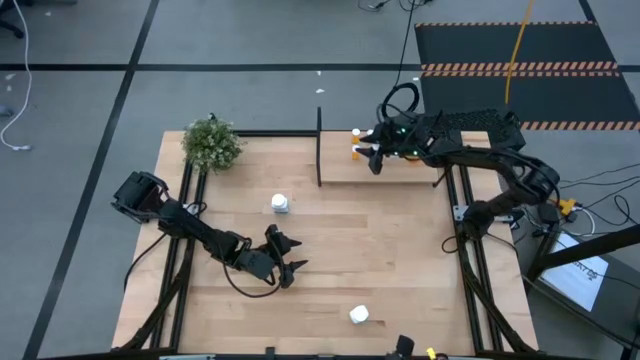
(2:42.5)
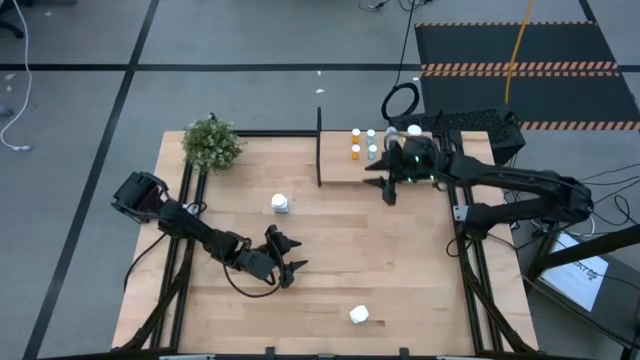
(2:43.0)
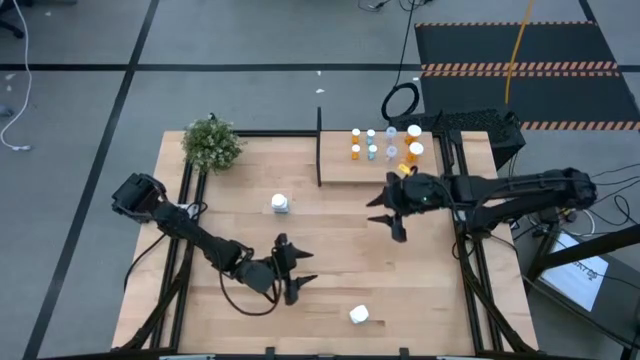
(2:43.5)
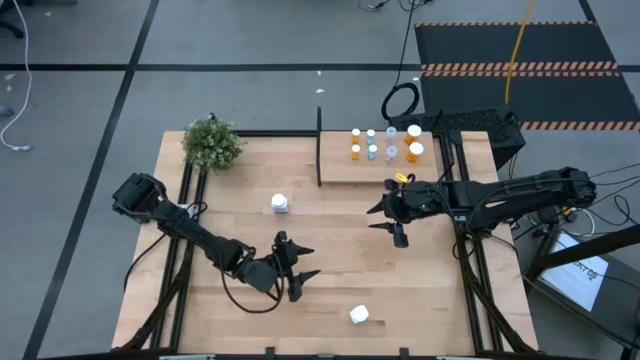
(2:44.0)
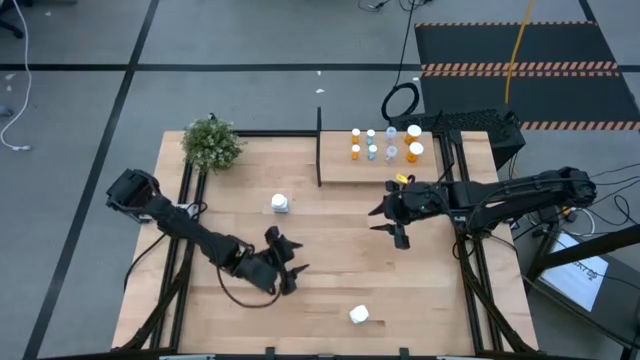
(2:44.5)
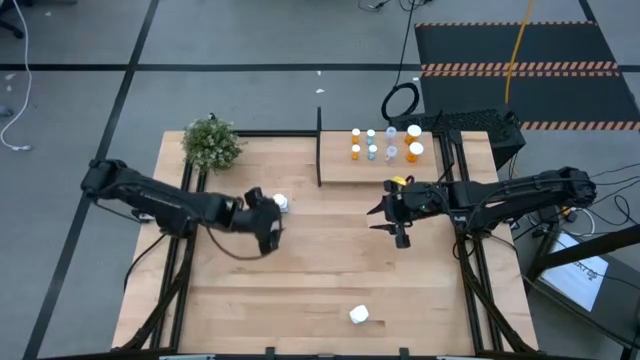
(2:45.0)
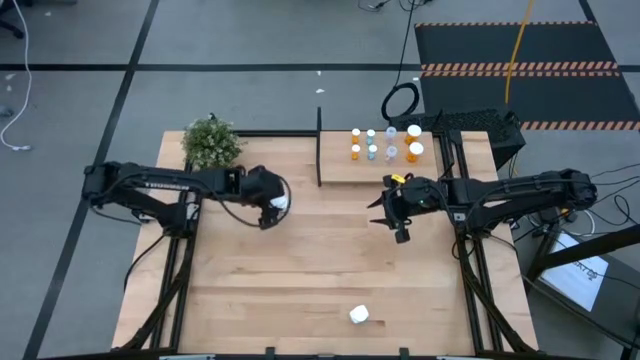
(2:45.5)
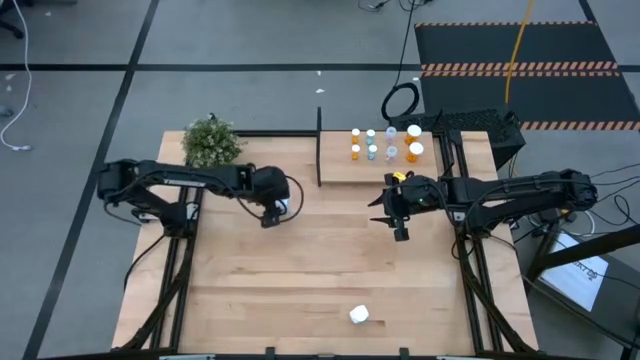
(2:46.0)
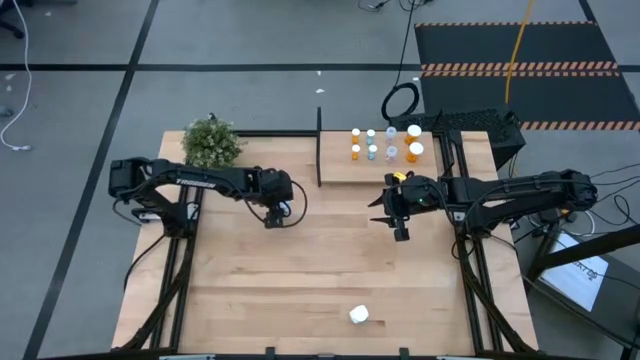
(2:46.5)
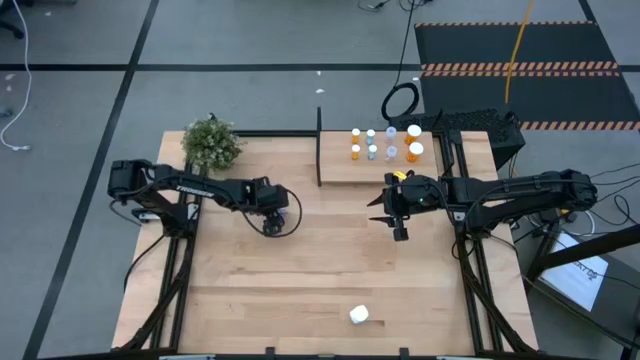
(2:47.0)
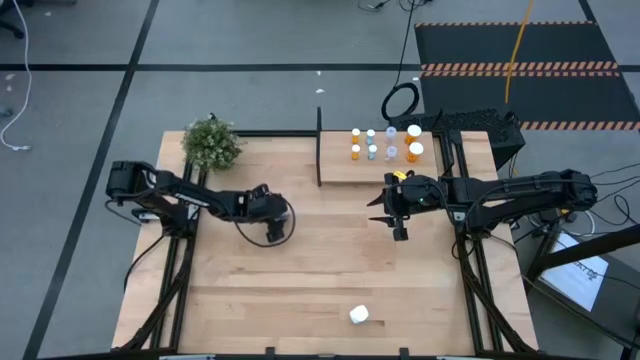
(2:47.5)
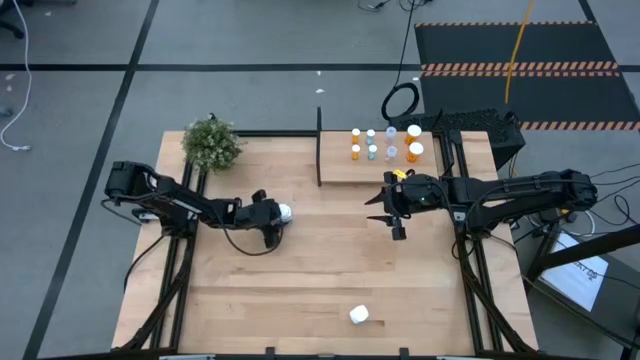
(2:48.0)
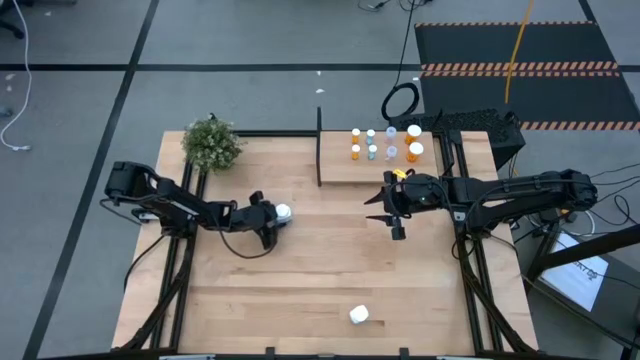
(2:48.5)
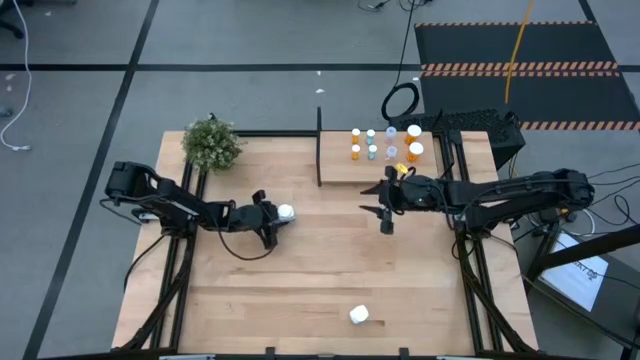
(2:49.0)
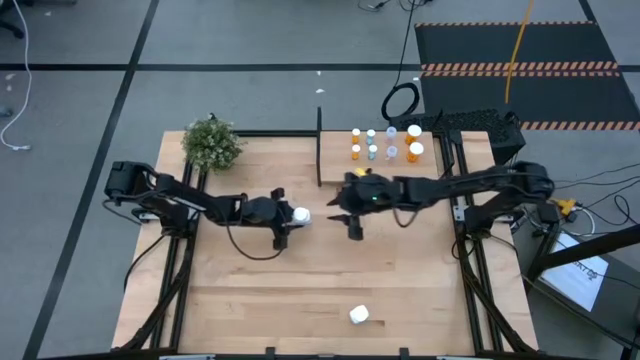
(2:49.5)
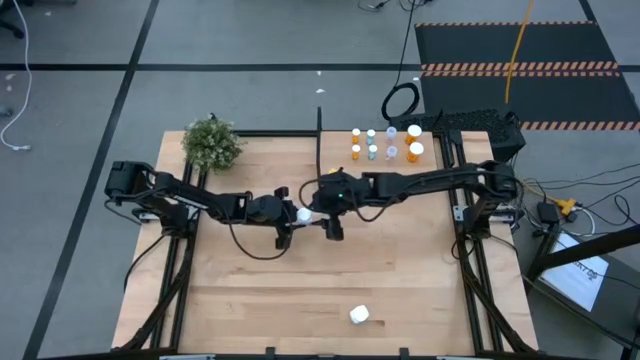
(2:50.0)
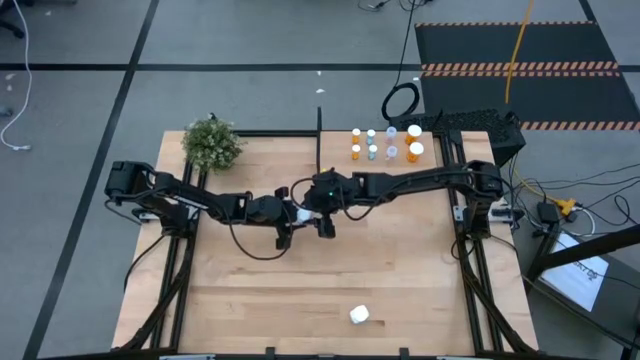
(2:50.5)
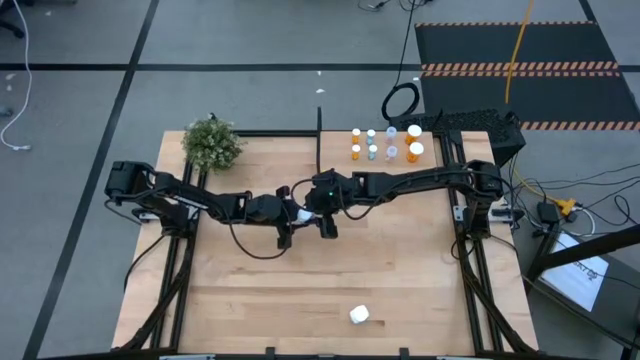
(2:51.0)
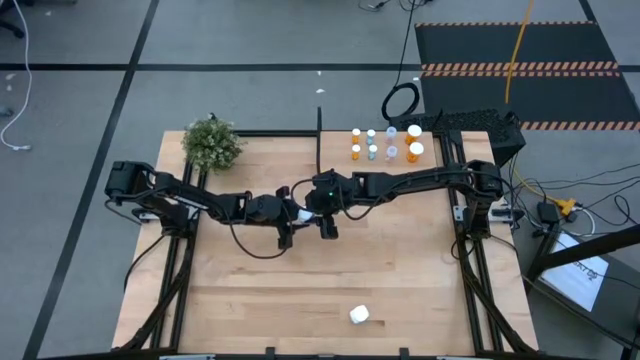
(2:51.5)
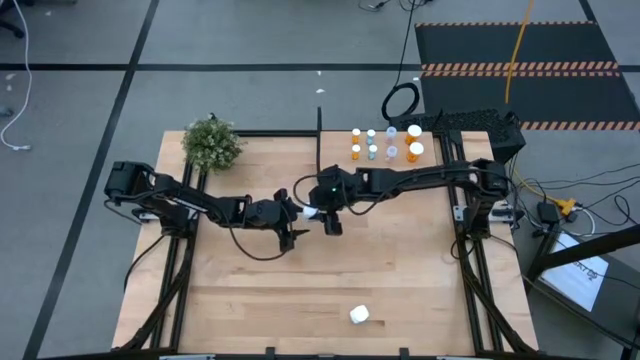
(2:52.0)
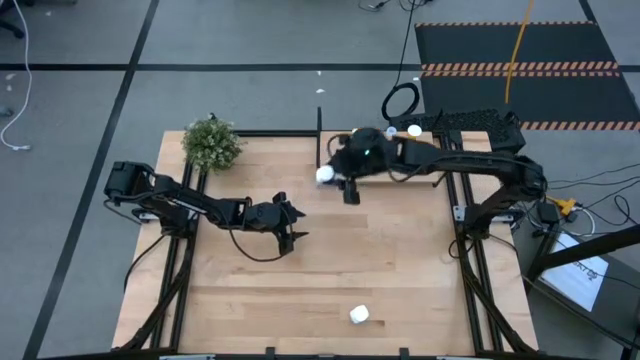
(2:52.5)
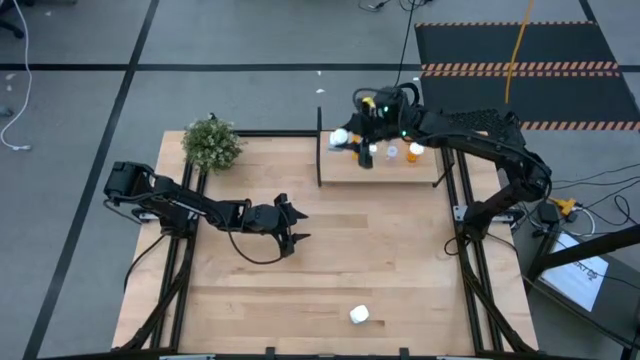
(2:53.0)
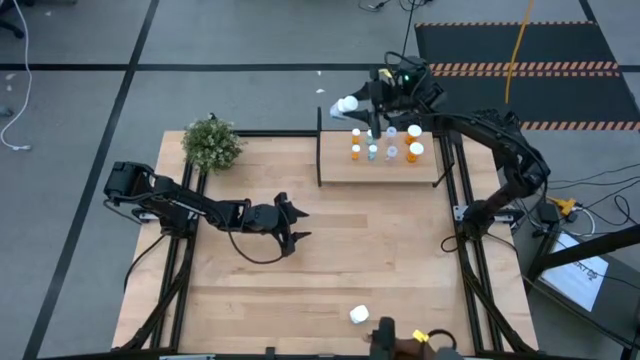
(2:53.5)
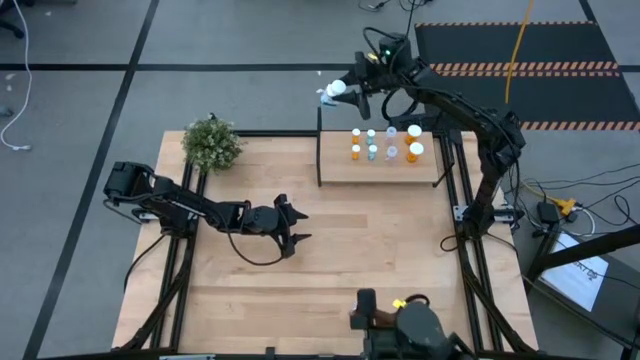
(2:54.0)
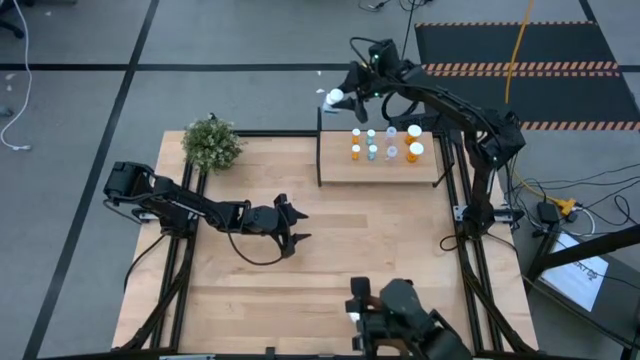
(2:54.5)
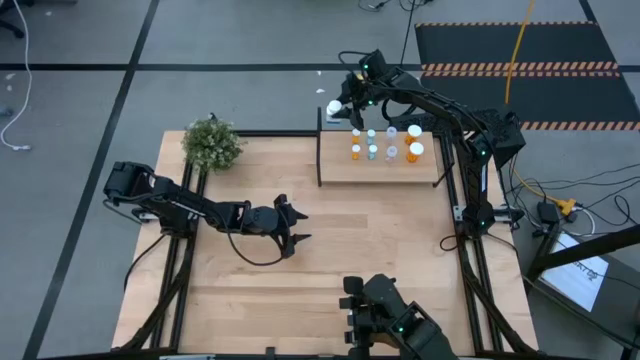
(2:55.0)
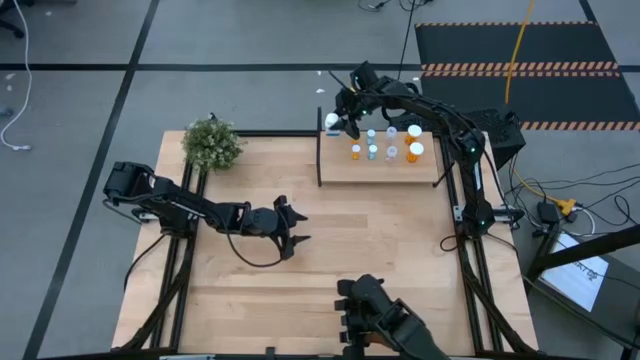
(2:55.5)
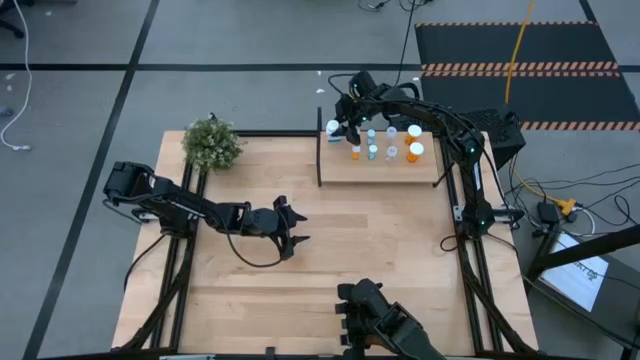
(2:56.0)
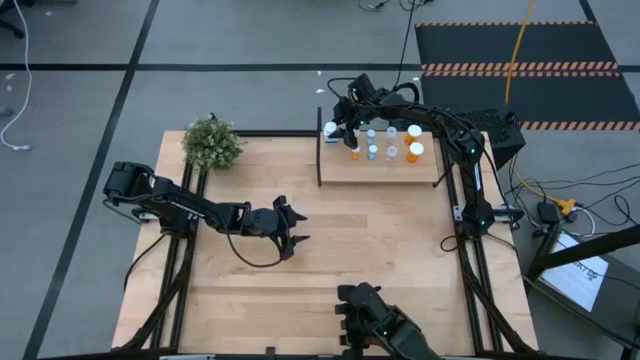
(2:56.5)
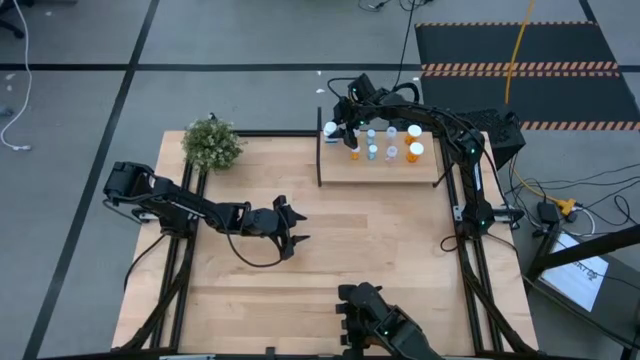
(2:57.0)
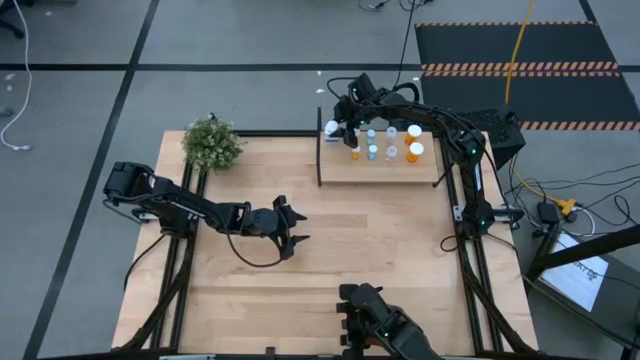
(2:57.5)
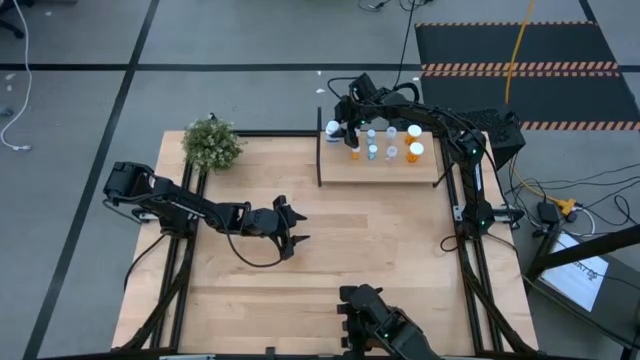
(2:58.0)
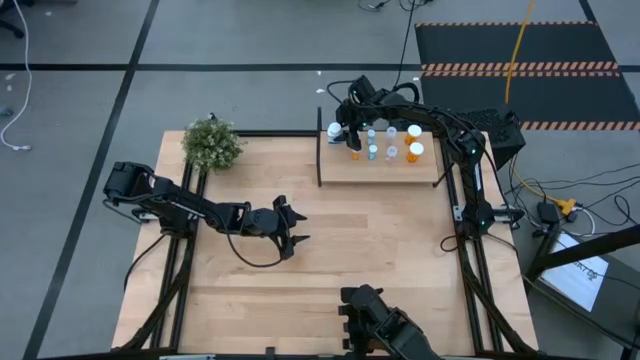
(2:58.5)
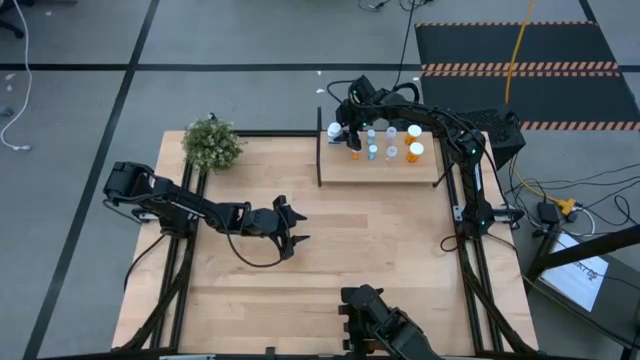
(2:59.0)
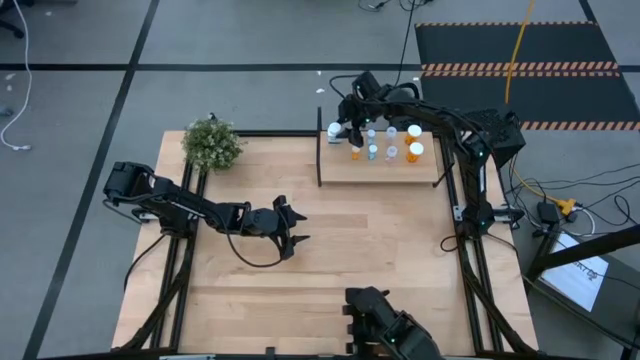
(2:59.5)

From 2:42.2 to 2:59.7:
Task: Pick and place medicine bottles onto shelf by color
Put the top white pill bottle on the shelf

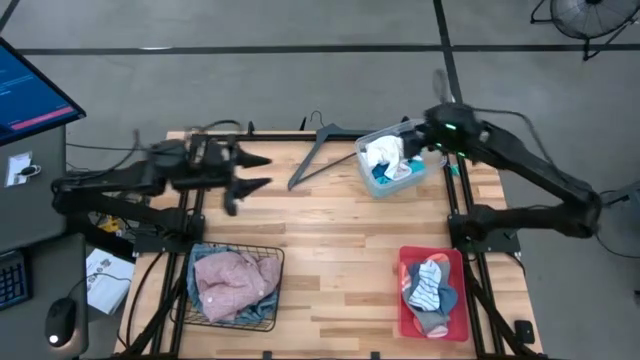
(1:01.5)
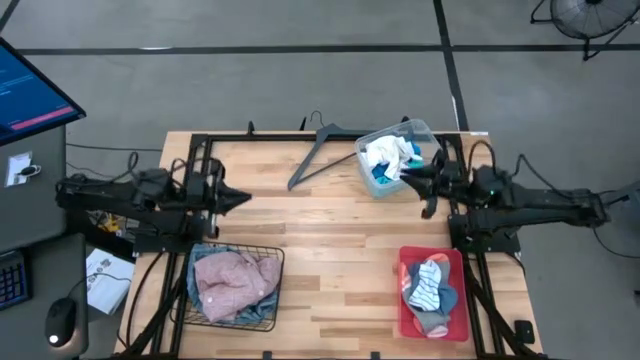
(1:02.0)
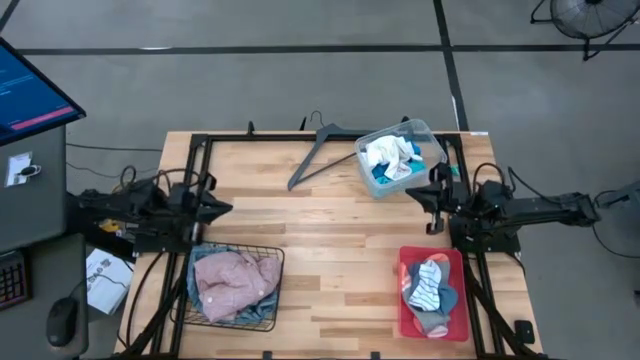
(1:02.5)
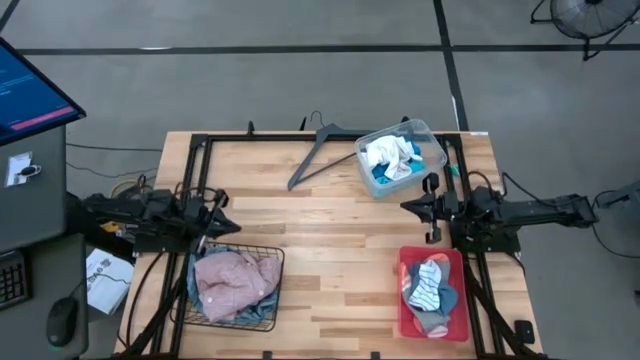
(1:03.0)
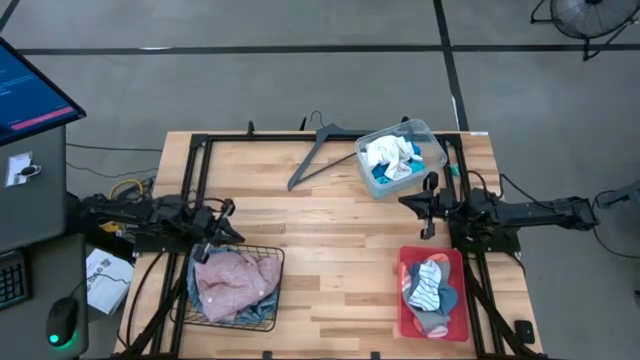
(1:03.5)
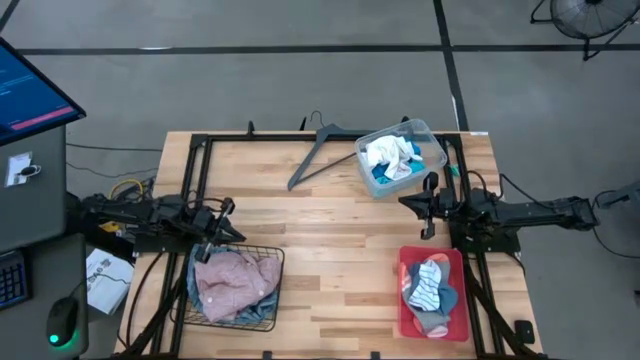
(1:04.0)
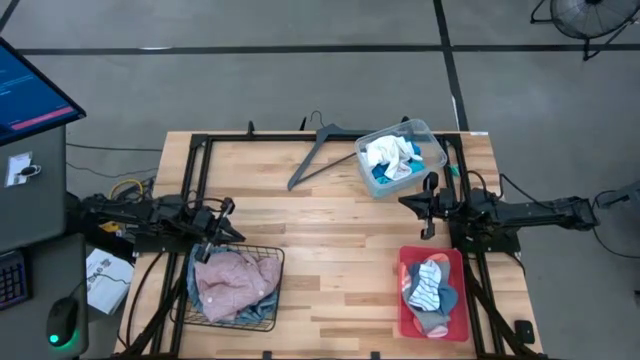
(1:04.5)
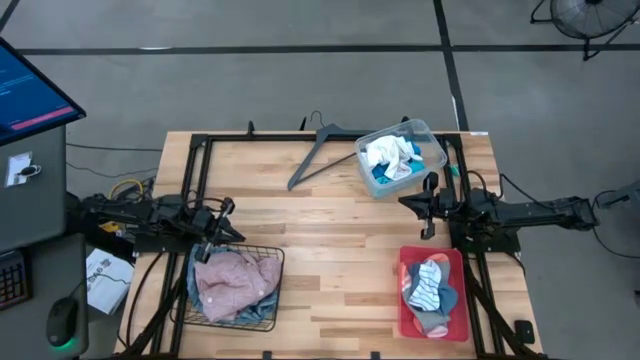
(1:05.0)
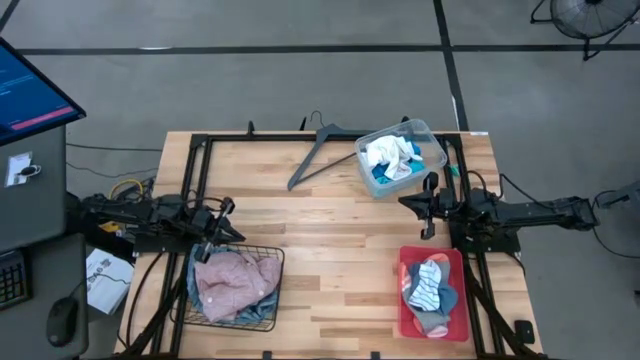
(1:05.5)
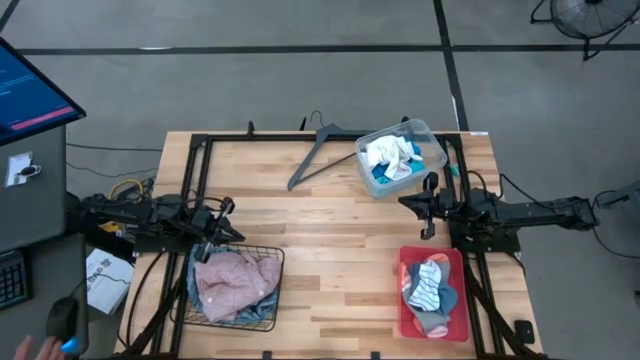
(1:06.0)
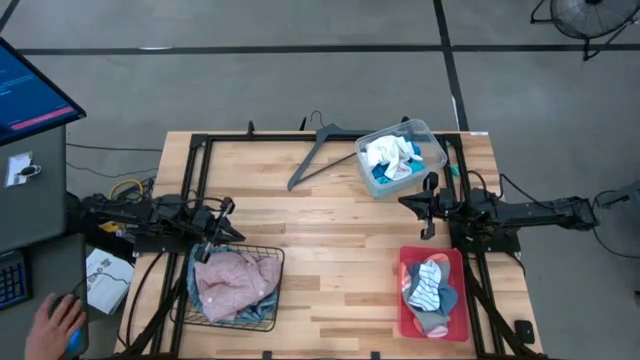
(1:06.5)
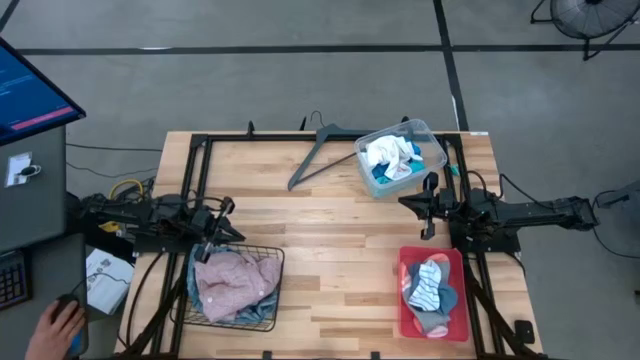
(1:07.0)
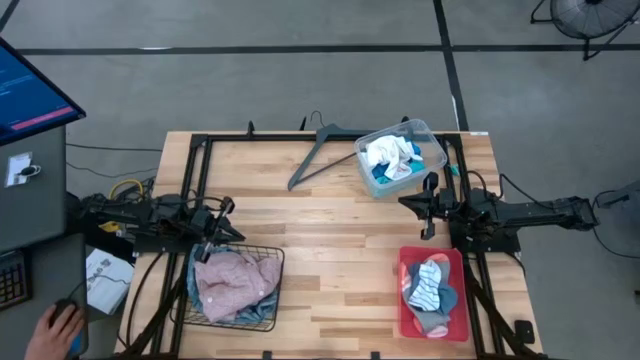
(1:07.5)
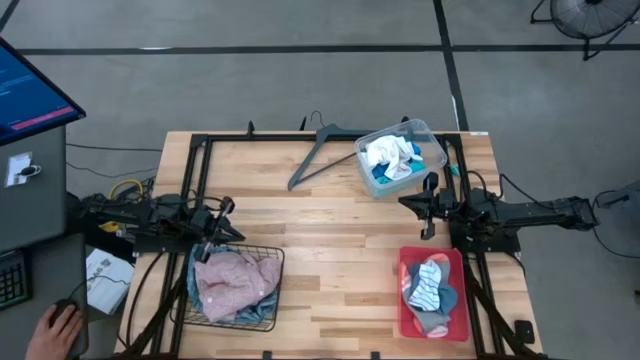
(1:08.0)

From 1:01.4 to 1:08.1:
Task: Pick & Place Cloths
Return to Home Position
